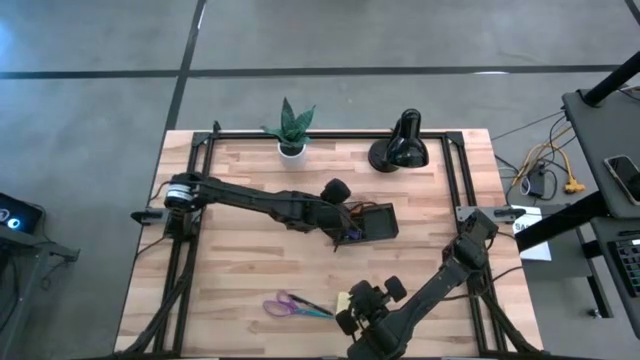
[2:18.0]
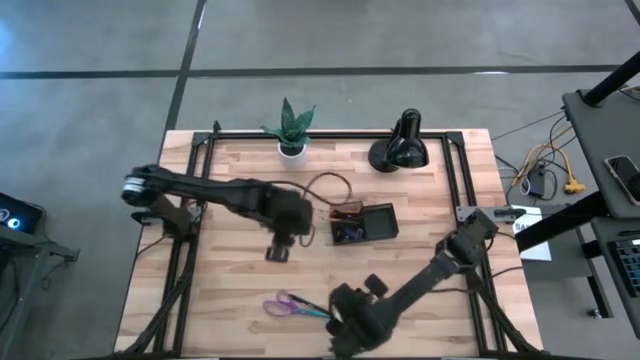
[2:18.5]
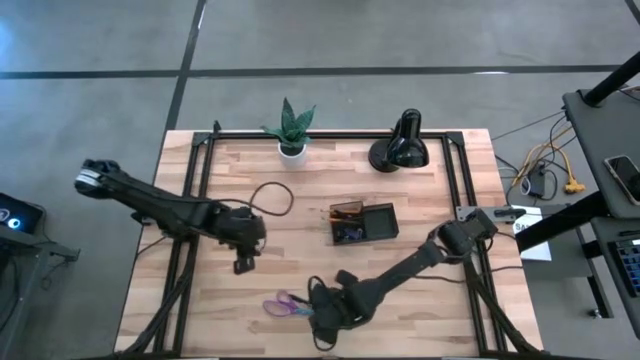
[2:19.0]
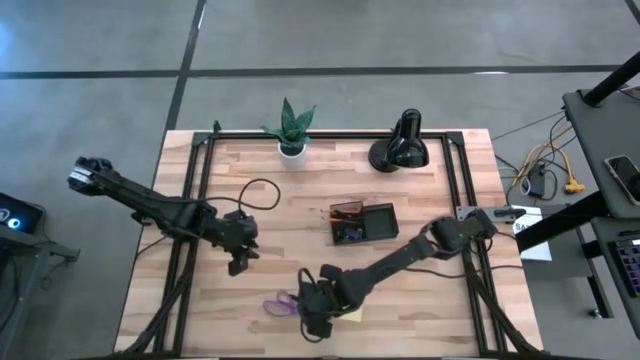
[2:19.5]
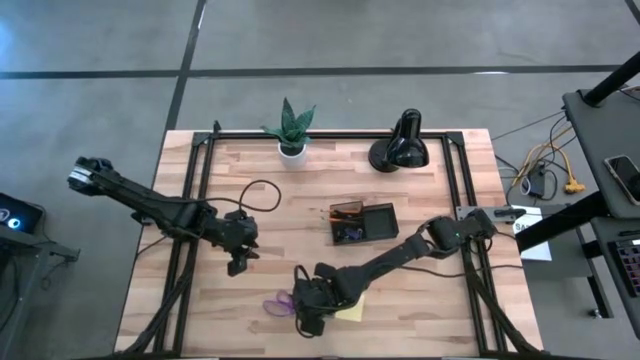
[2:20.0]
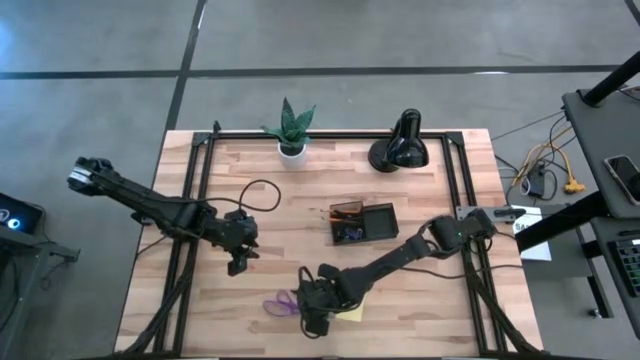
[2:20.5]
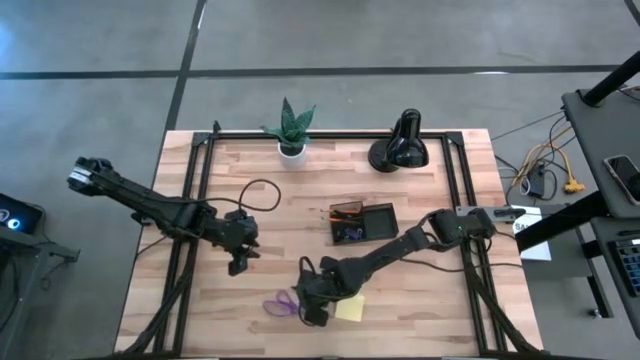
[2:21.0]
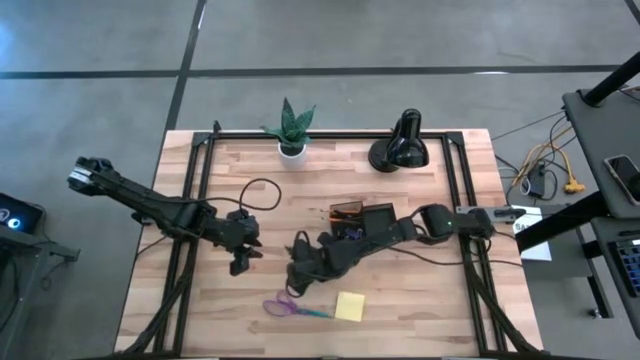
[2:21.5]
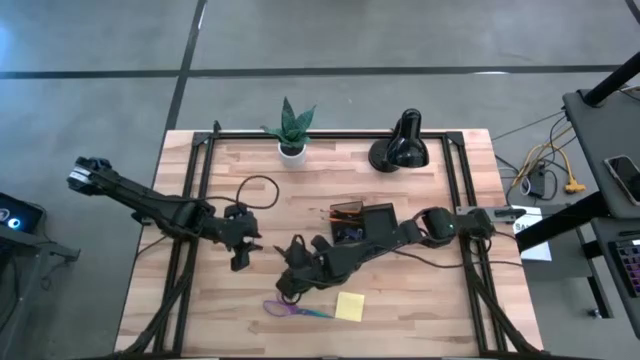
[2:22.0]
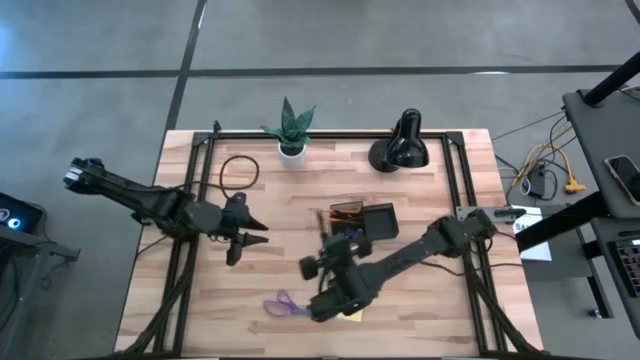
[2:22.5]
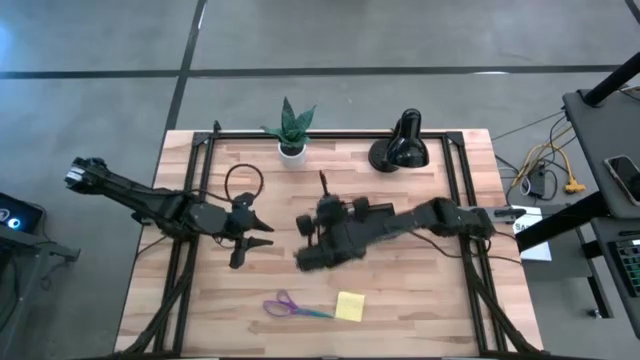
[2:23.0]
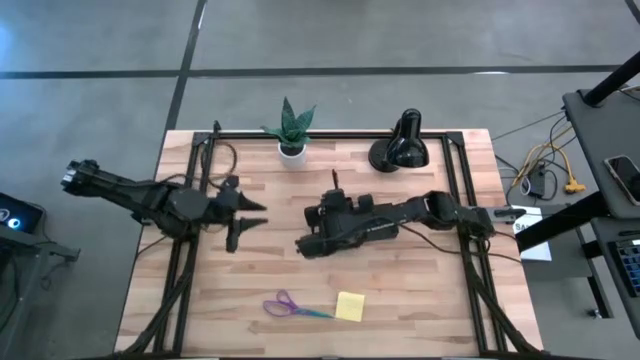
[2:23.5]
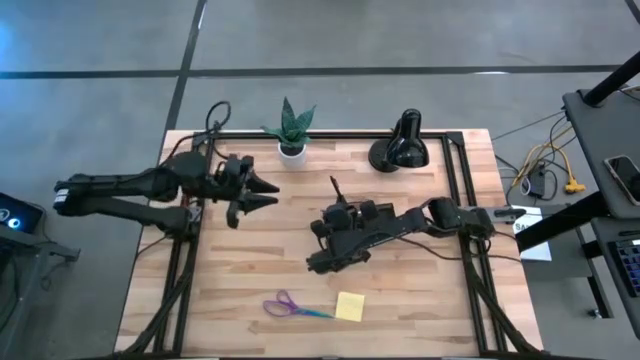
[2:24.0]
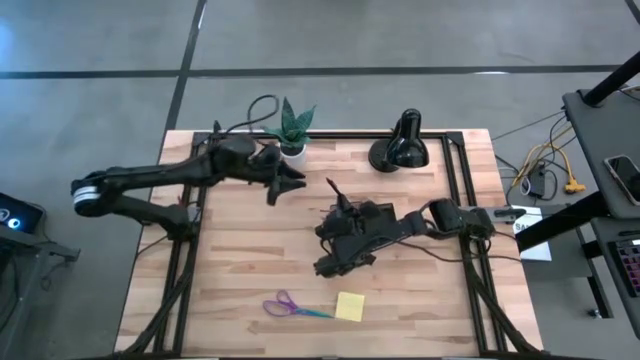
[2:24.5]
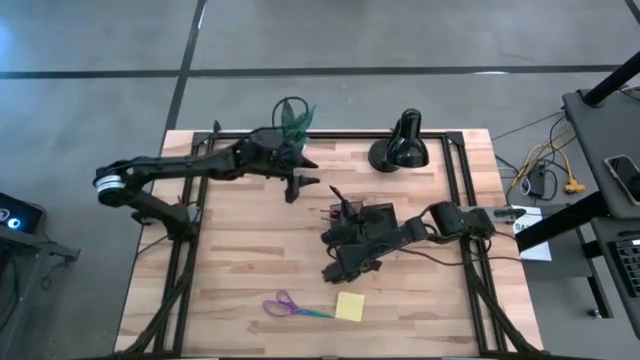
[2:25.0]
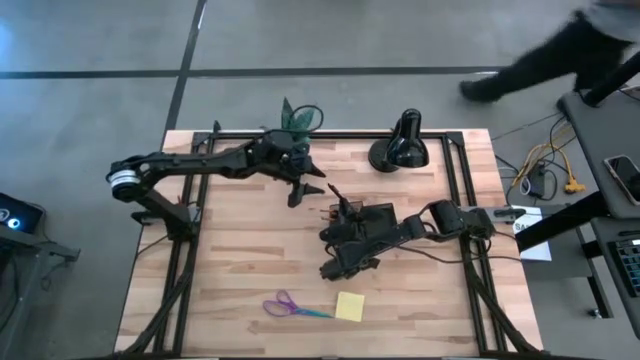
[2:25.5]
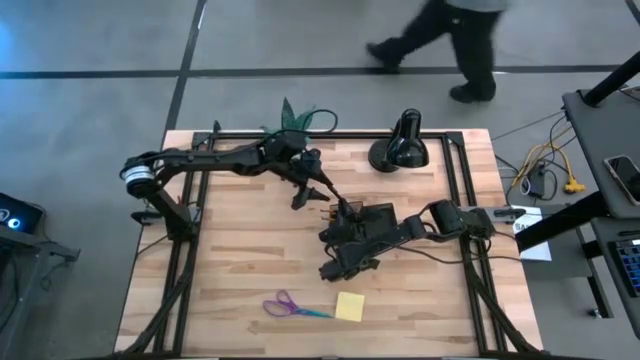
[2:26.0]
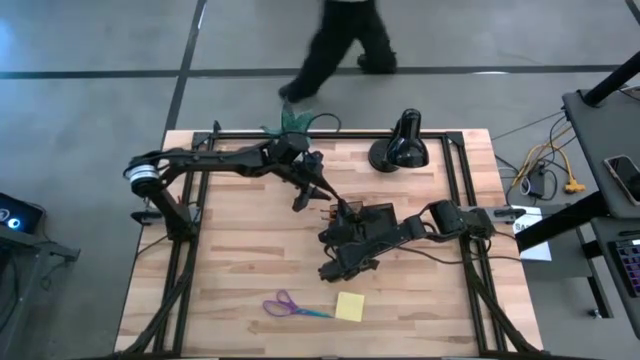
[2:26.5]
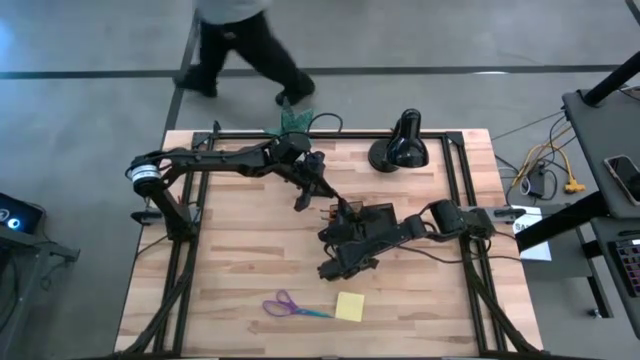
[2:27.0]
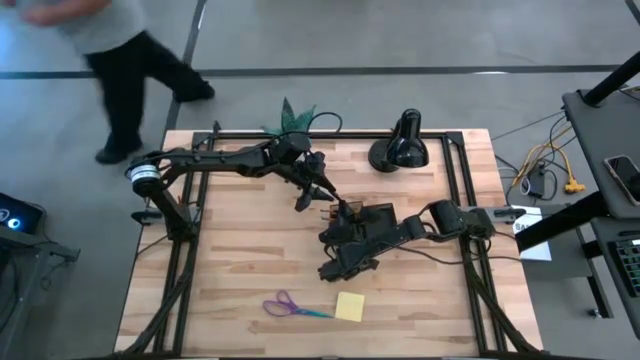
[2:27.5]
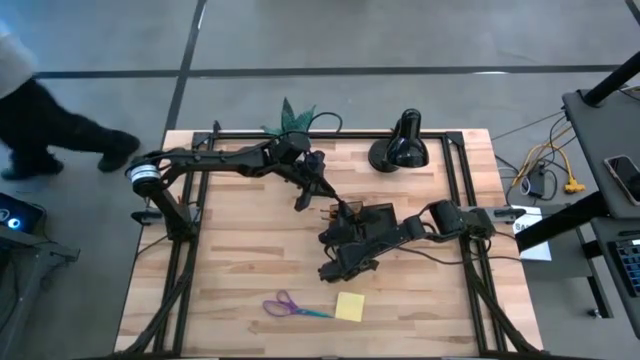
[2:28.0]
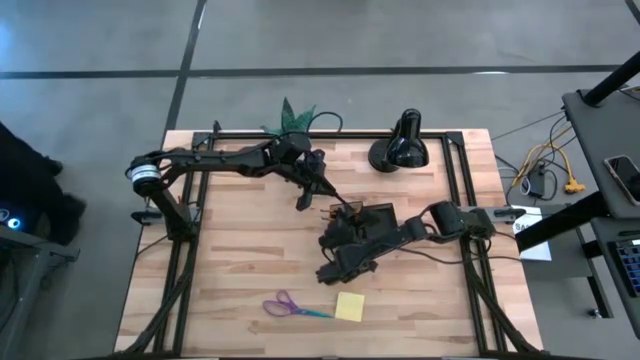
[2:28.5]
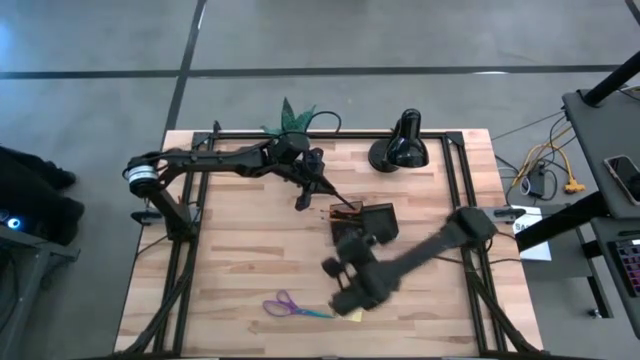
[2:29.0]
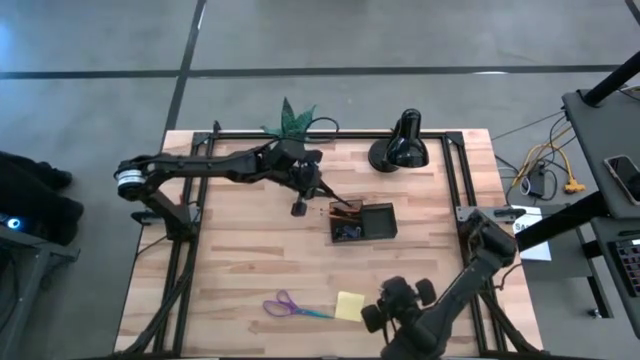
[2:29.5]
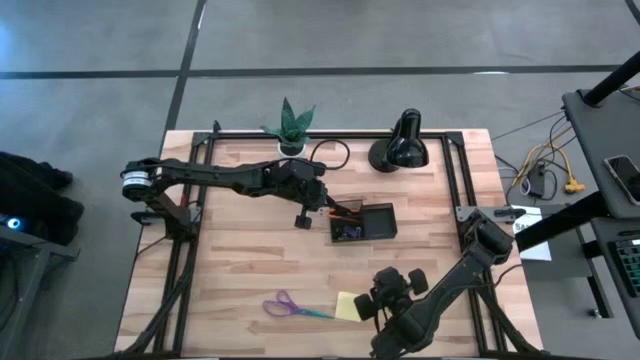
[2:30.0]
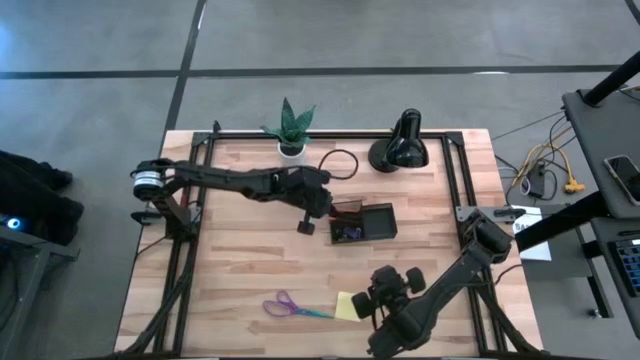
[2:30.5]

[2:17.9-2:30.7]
Task: Pick and place office supplies into organizer
Put the black ballpen into the black desk organizer

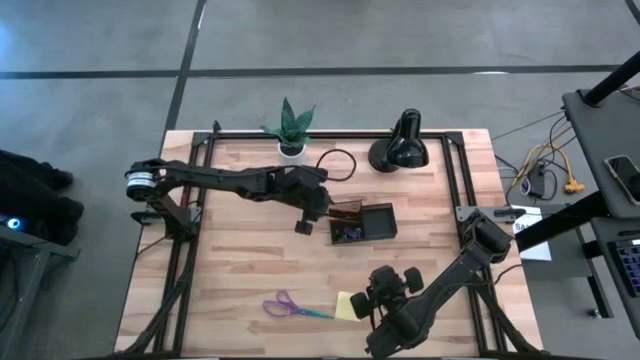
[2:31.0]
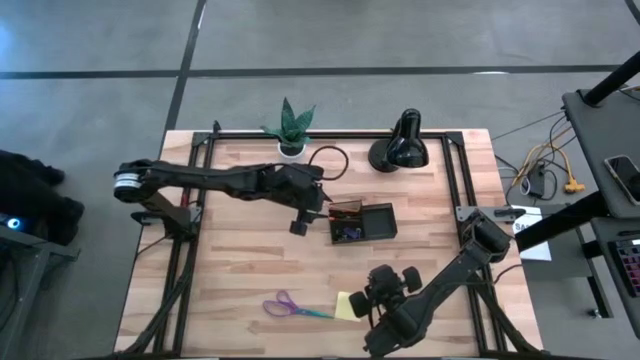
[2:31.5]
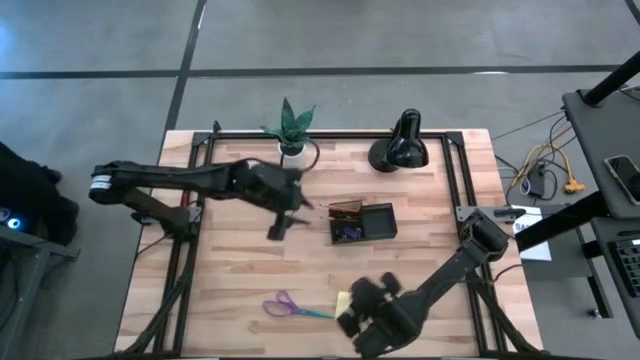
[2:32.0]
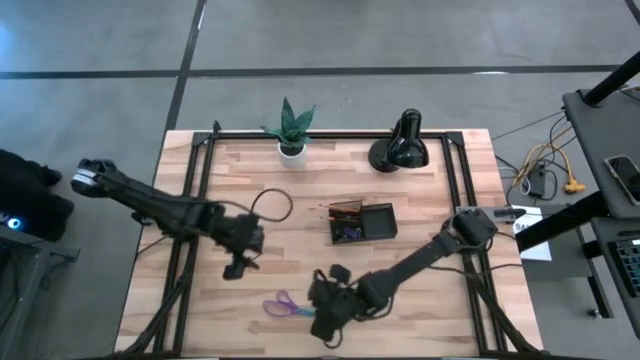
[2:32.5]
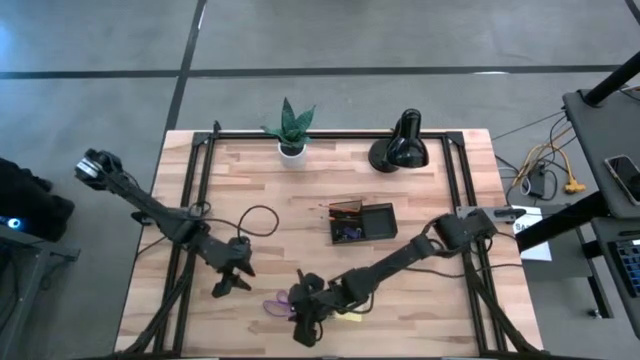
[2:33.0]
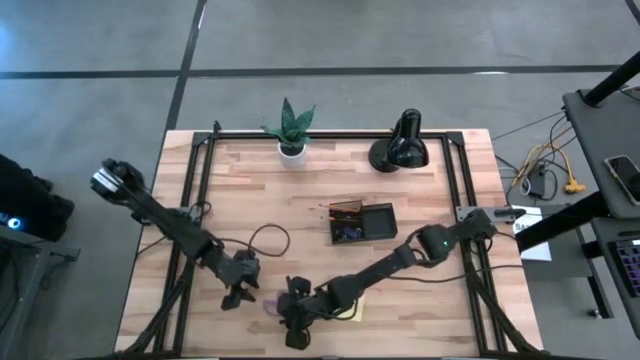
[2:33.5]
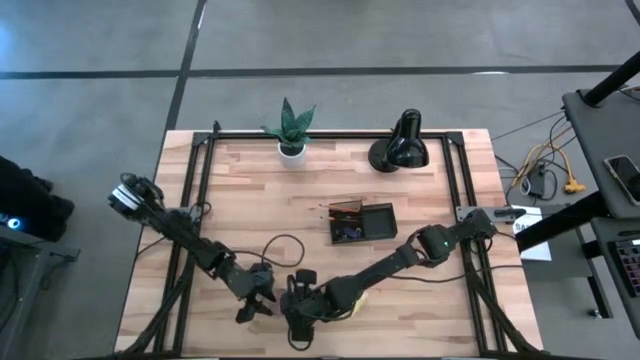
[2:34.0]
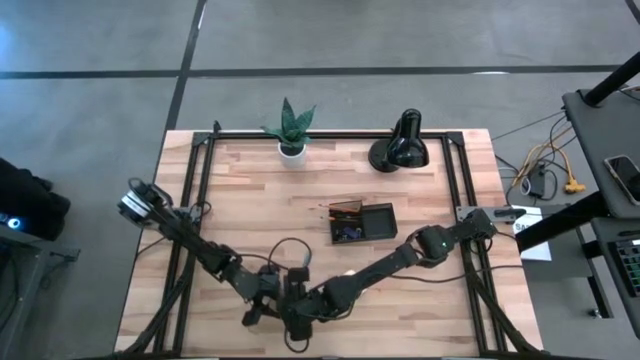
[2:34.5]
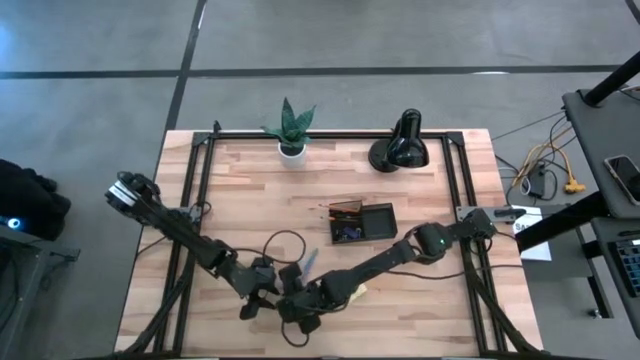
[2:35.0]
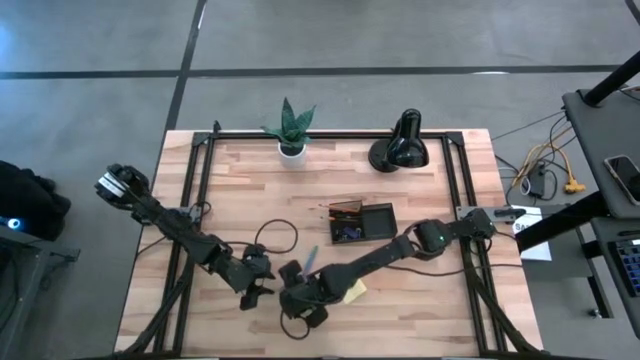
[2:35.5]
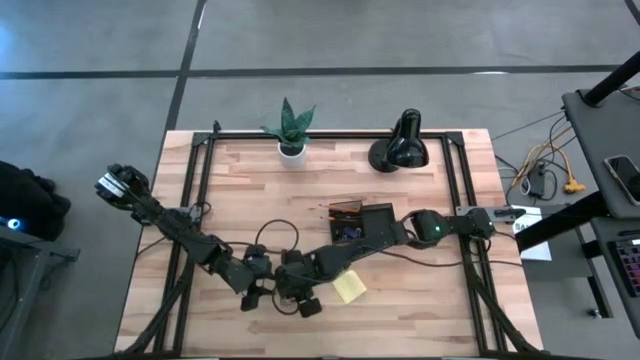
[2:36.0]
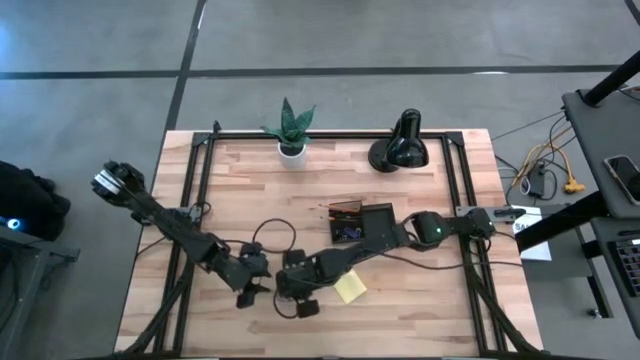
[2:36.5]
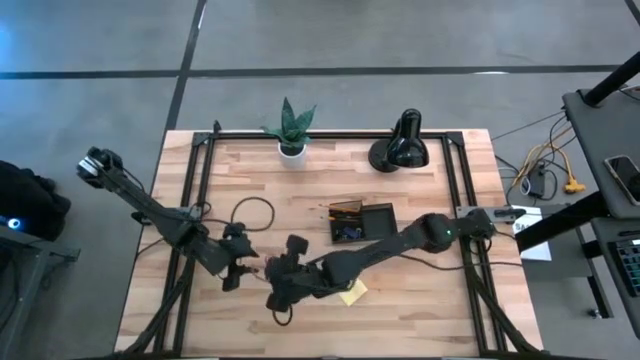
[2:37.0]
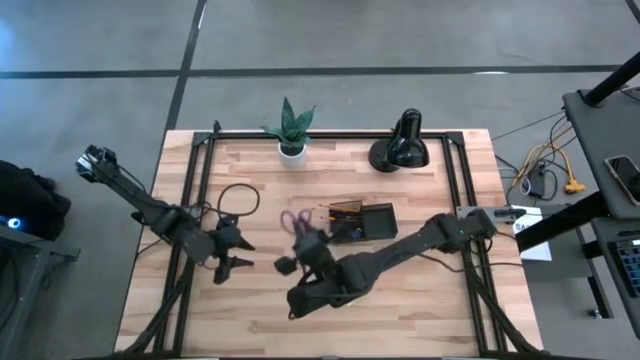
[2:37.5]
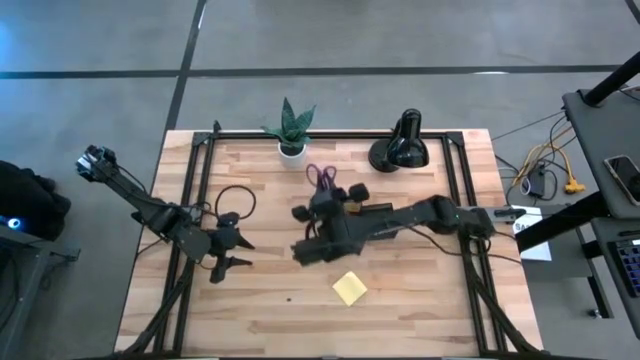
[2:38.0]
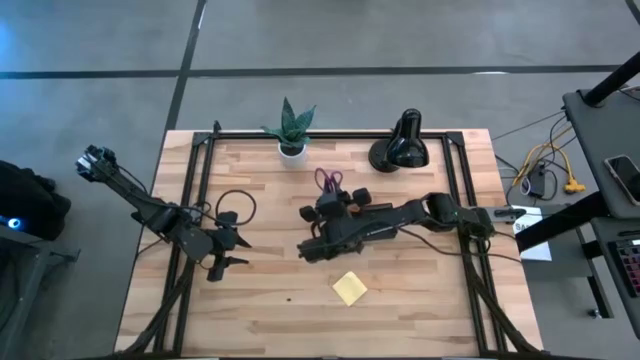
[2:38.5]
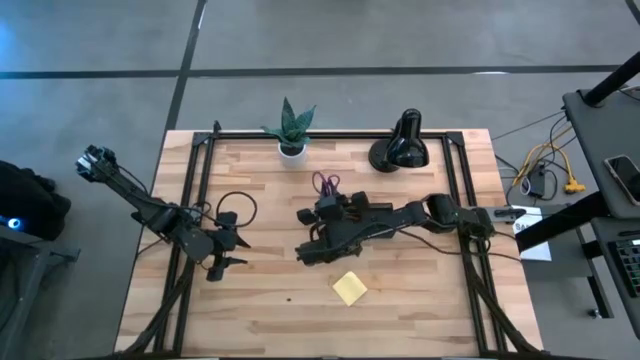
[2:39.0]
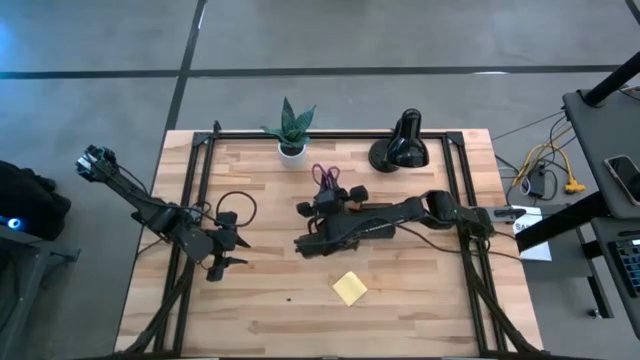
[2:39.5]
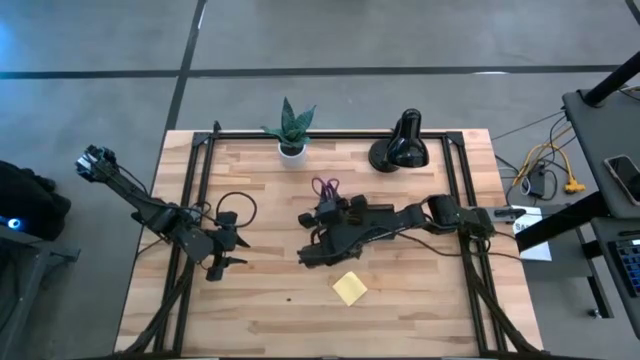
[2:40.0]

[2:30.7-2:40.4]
Put the purple scissors into the black desk organizer
